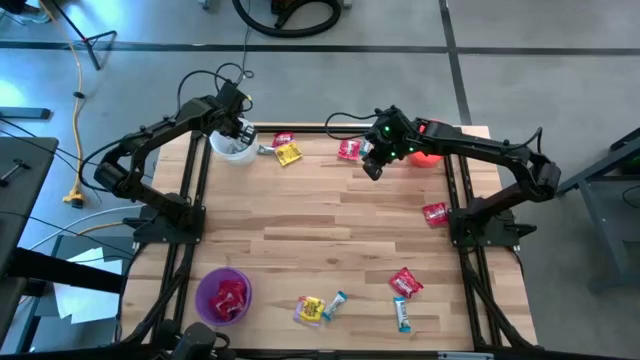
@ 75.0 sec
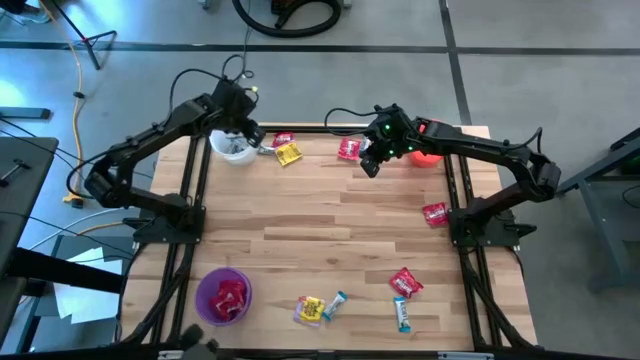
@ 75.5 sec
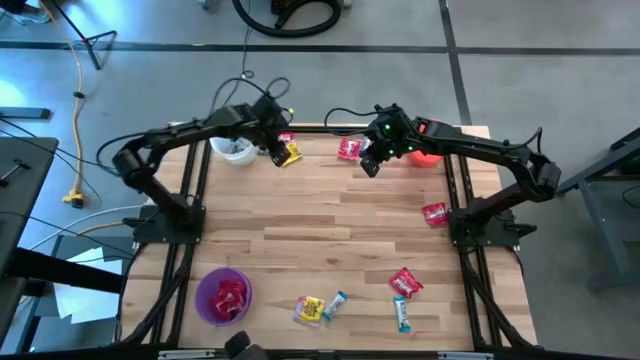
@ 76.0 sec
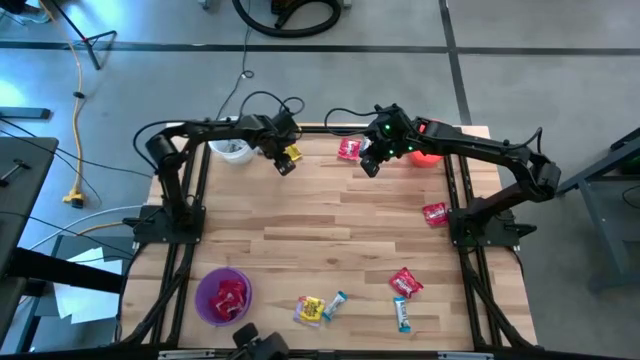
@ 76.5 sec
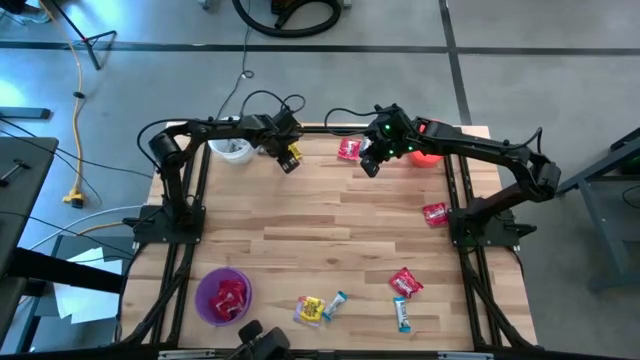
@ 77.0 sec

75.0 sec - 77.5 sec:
Task: Sort candy
Put the yellow candy into the orange bucket

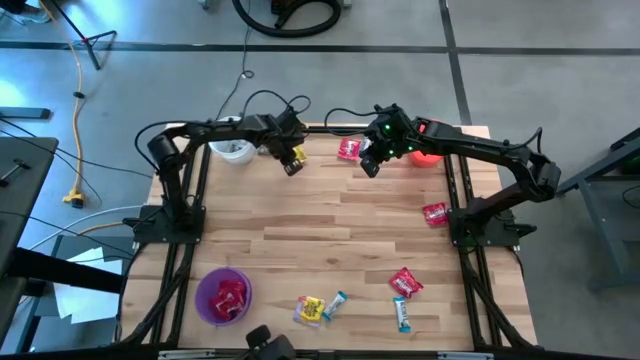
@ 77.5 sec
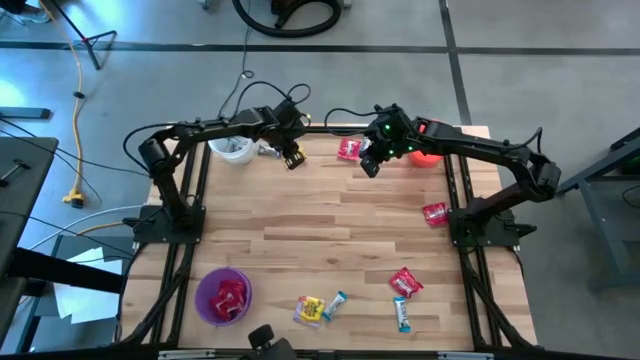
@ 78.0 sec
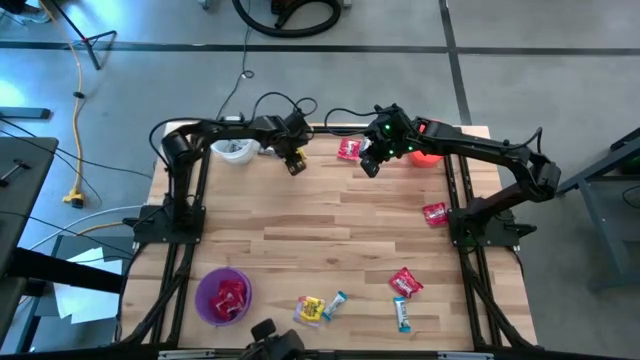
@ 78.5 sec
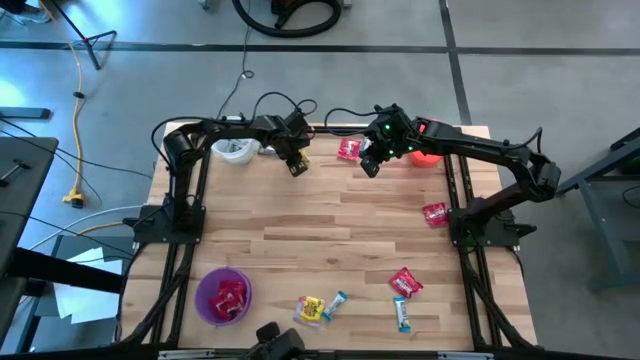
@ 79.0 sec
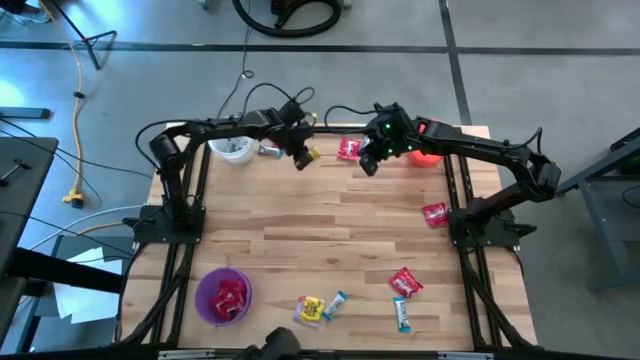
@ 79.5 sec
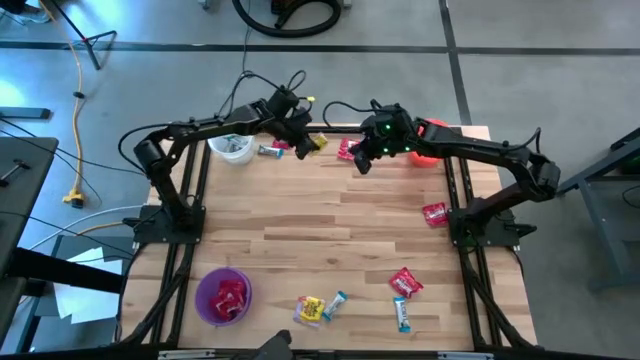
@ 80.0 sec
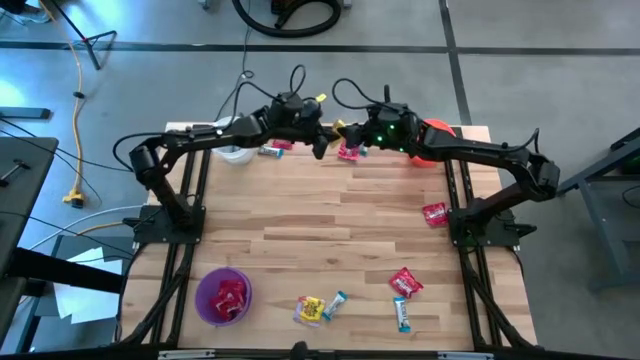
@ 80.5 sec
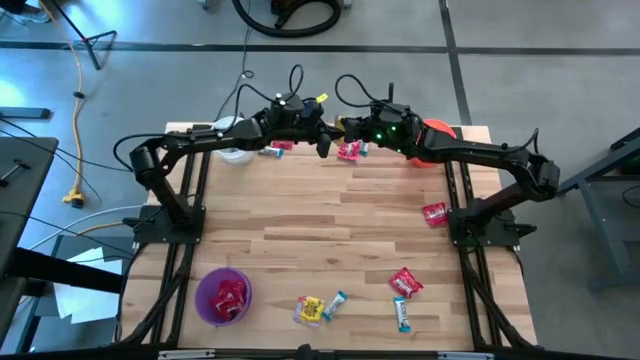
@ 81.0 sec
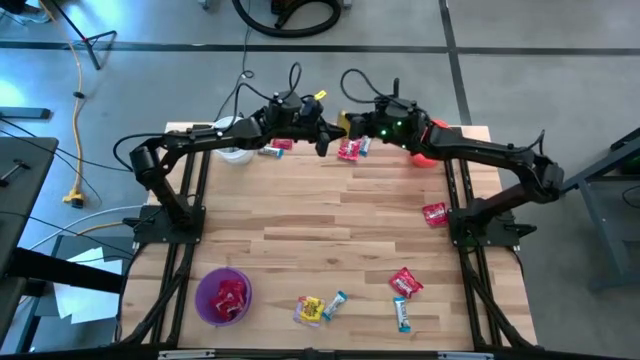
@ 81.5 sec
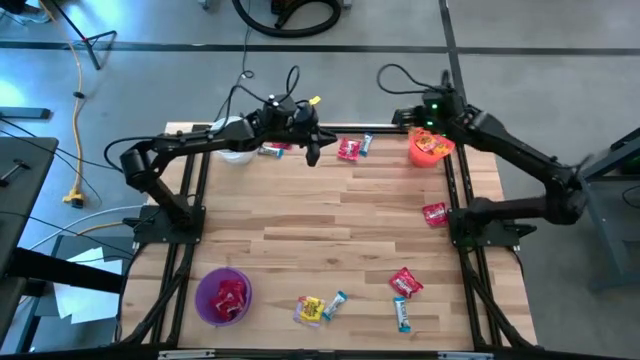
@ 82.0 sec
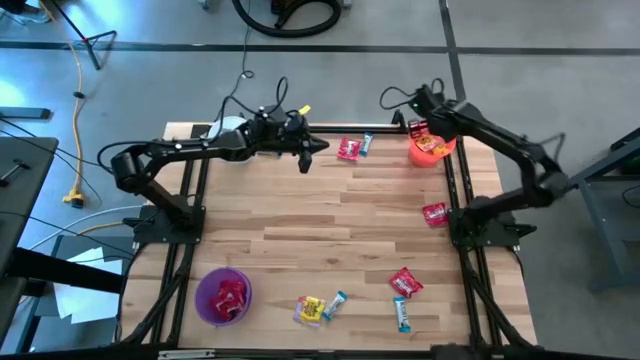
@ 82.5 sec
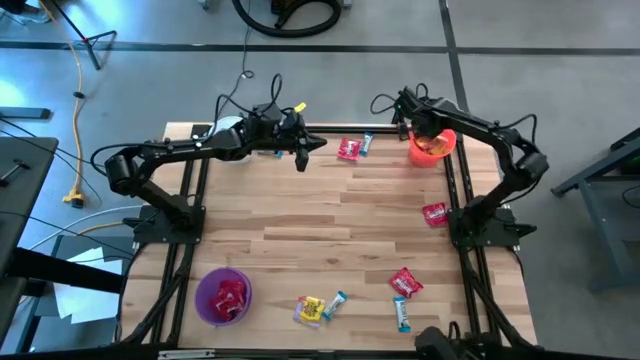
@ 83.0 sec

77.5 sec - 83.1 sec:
Put the yellow candy into the orange bucket

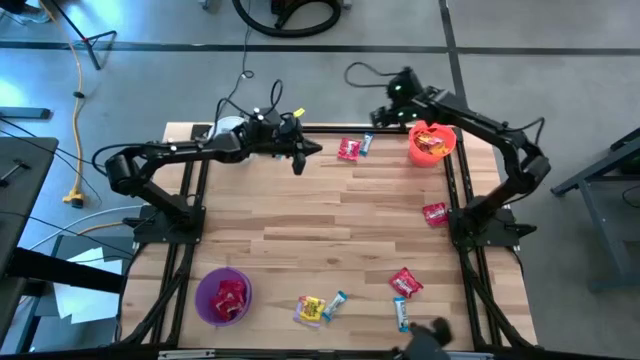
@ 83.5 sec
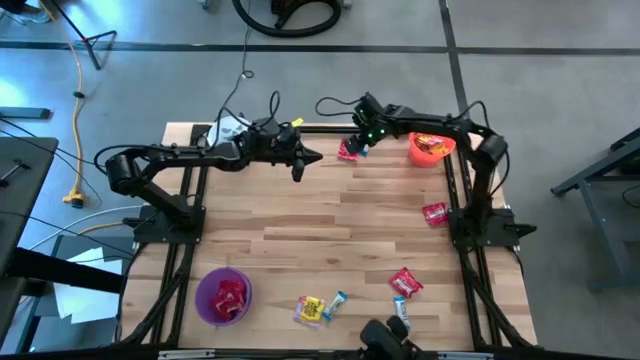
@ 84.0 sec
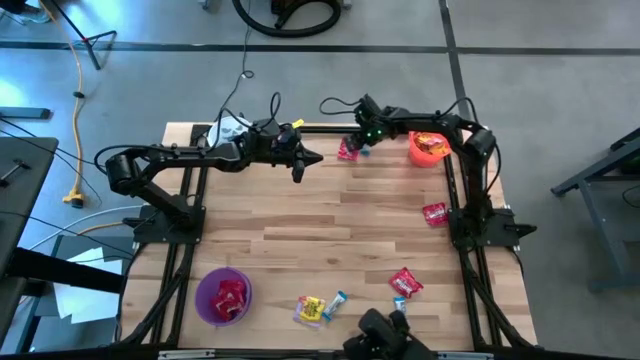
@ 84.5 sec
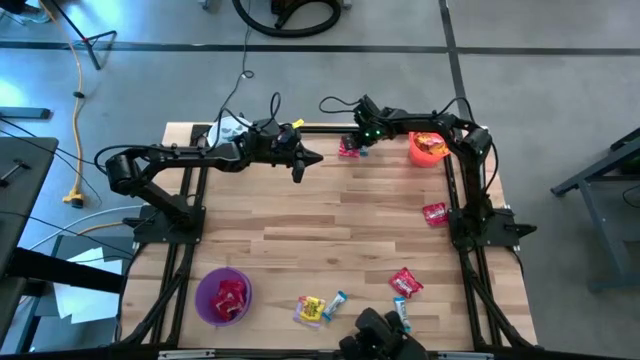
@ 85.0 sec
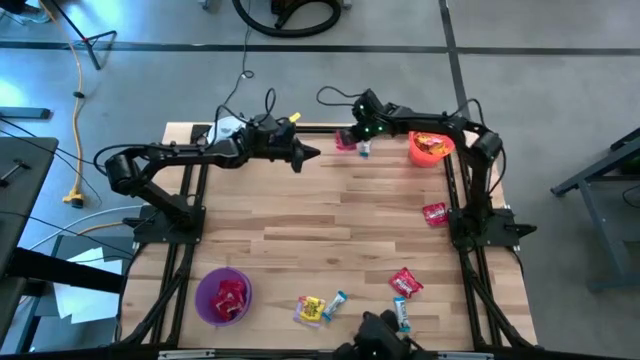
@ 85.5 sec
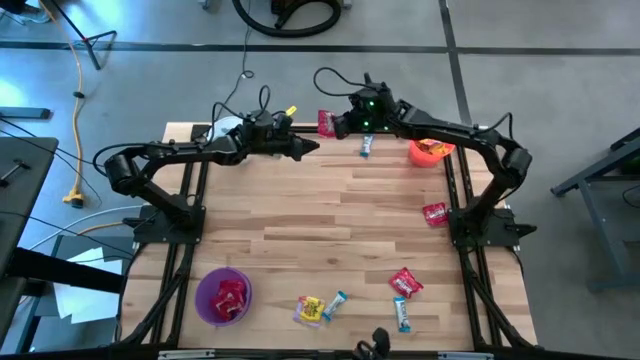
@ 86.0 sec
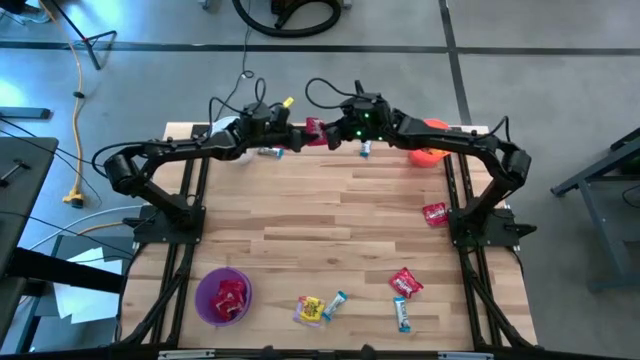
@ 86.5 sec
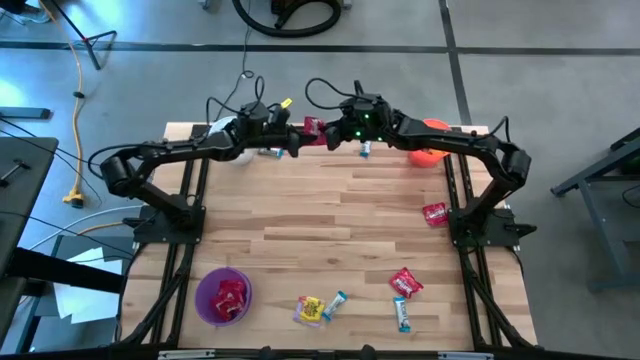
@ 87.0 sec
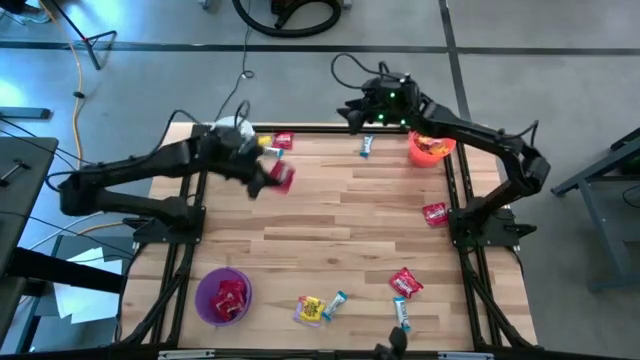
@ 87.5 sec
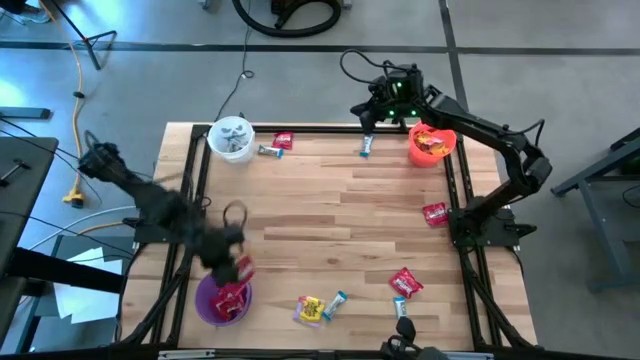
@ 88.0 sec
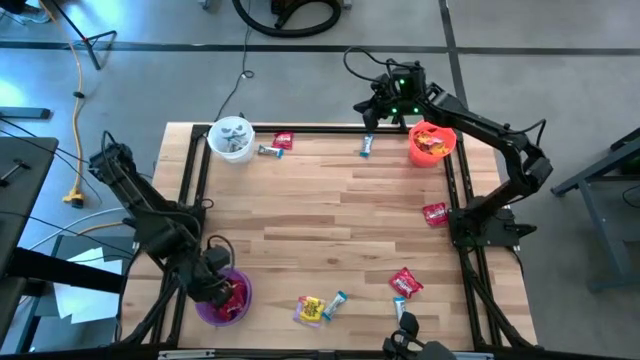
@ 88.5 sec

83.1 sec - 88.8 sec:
Put the red candy into the purple bucket

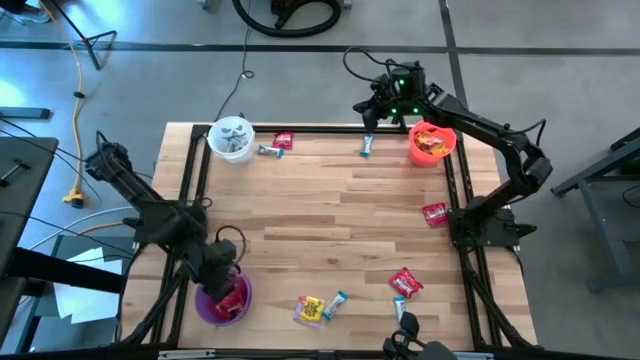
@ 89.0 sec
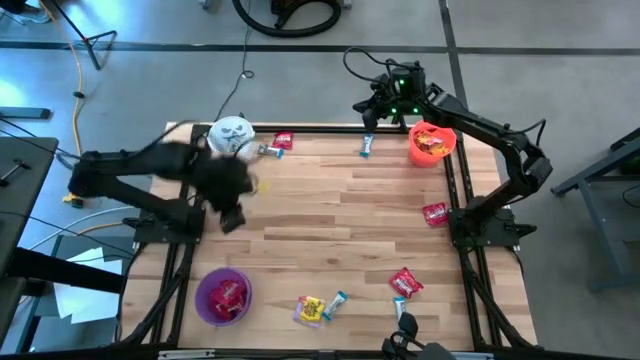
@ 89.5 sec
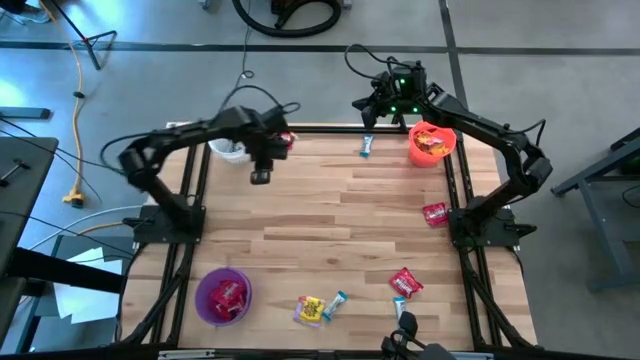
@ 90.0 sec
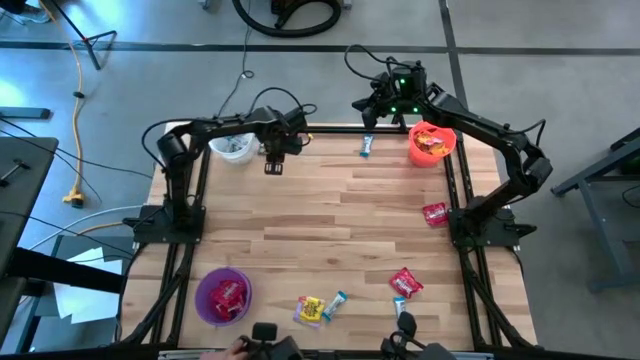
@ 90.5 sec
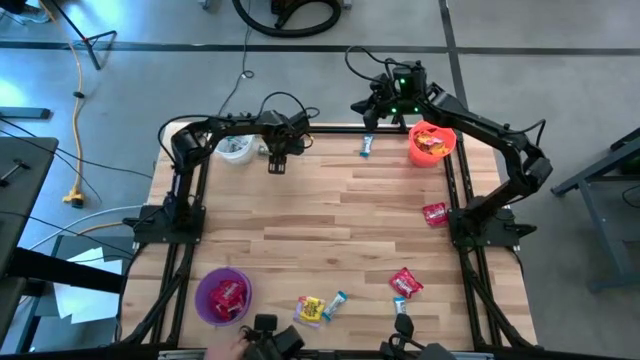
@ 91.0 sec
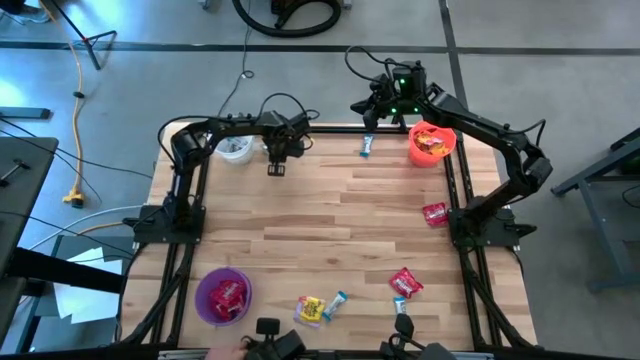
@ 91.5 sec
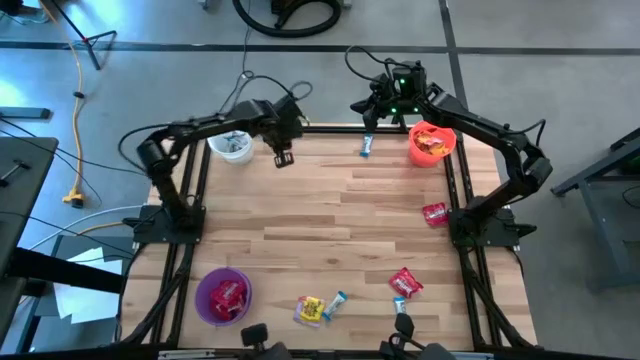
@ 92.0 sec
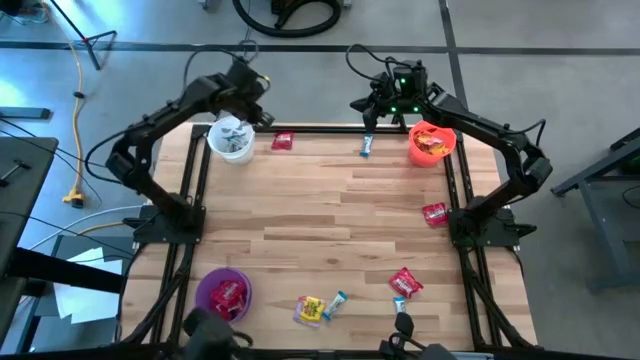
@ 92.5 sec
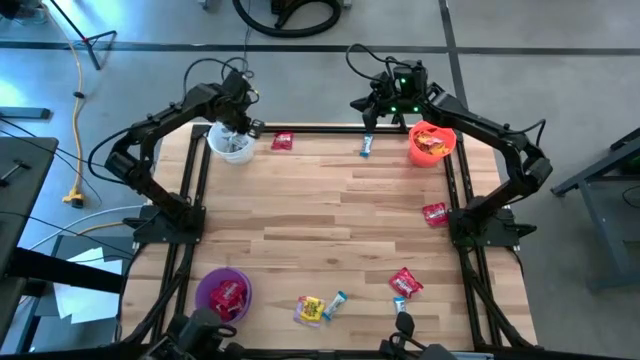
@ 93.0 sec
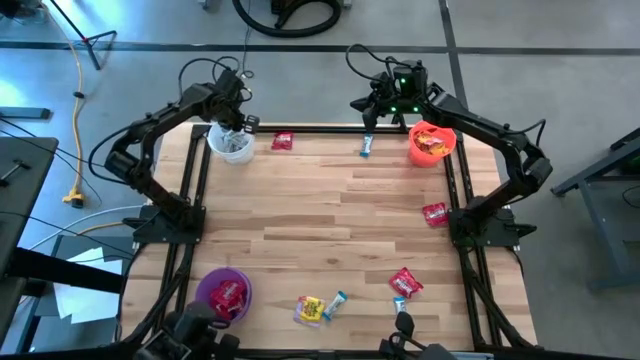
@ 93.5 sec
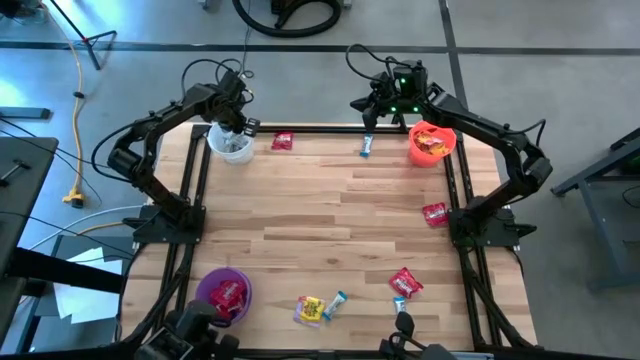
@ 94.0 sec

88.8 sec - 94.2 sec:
Put the white candy into the white bucket

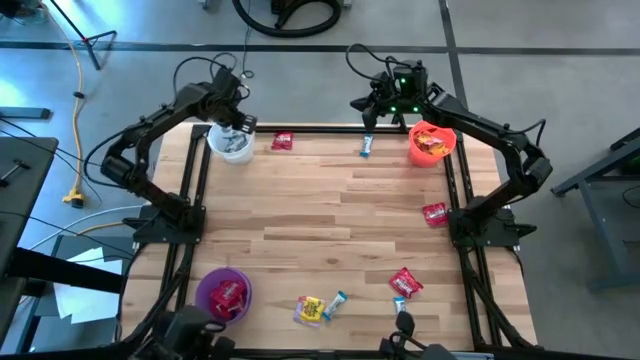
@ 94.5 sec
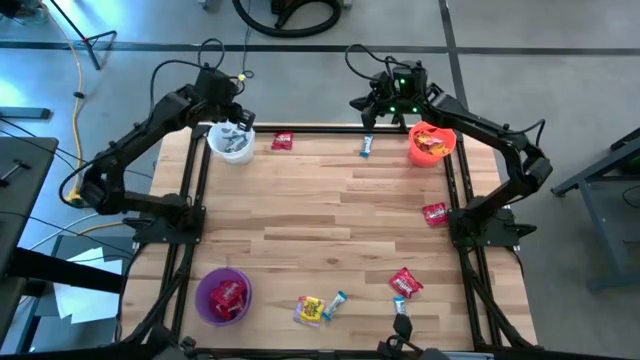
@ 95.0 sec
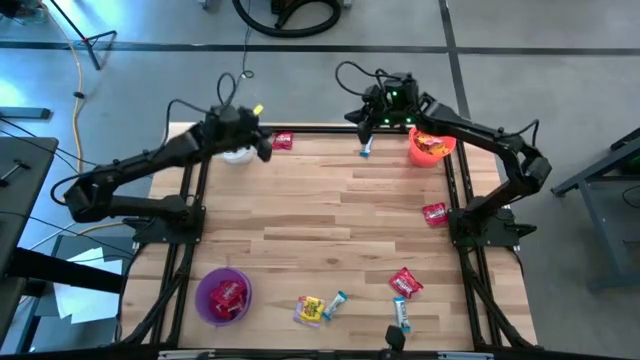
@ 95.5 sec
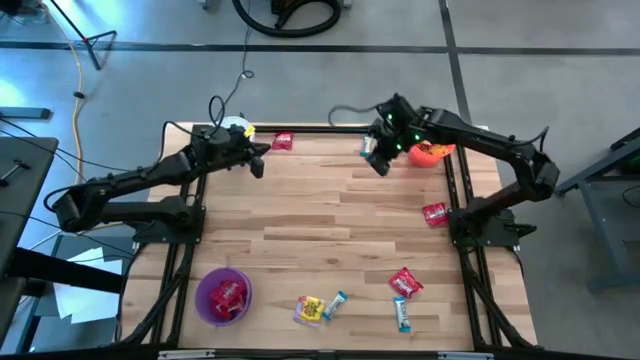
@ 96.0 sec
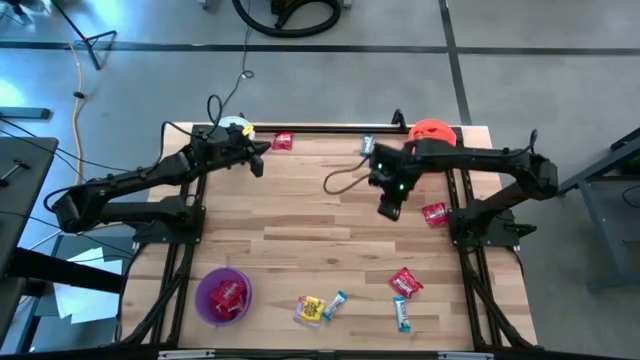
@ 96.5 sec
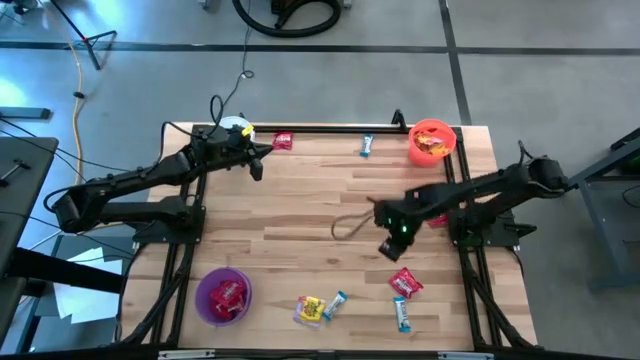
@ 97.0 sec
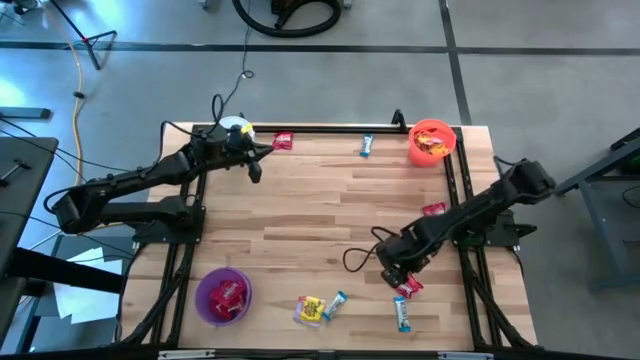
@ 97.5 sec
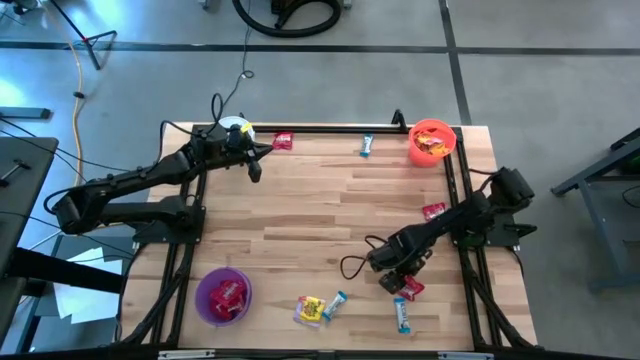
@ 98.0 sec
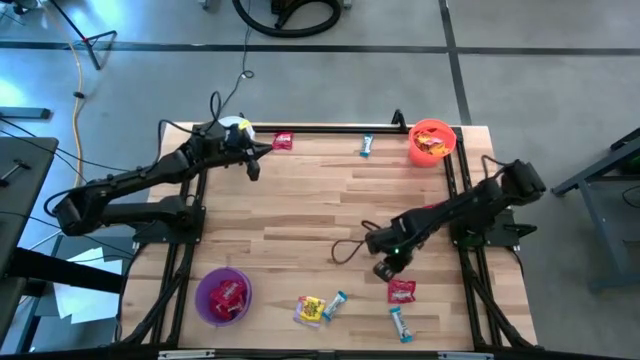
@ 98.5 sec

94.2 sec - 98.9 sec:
Put the red candy into the purple bucket
